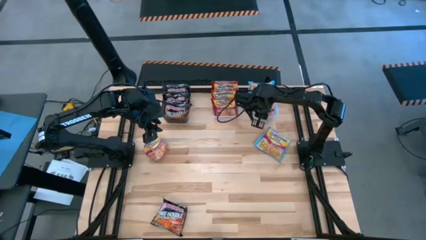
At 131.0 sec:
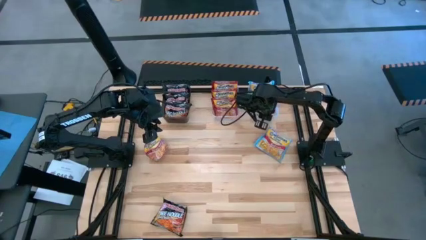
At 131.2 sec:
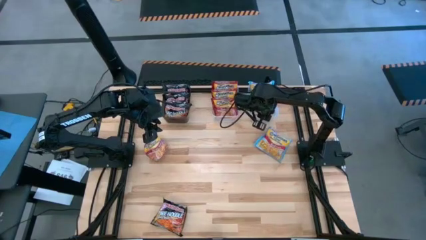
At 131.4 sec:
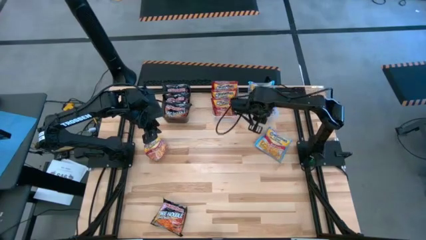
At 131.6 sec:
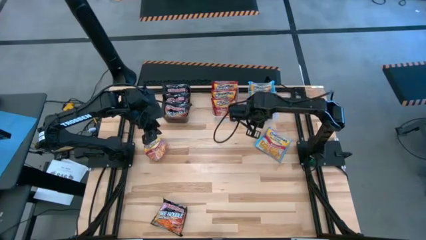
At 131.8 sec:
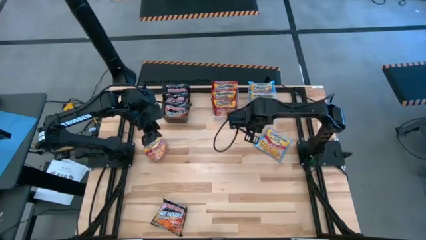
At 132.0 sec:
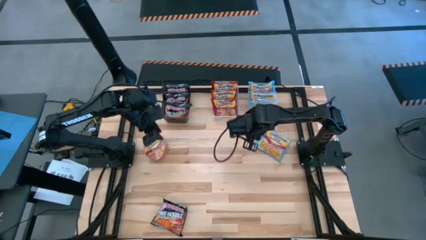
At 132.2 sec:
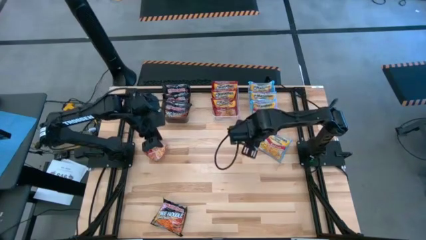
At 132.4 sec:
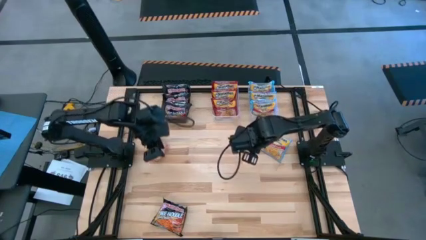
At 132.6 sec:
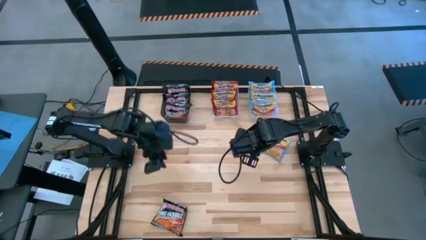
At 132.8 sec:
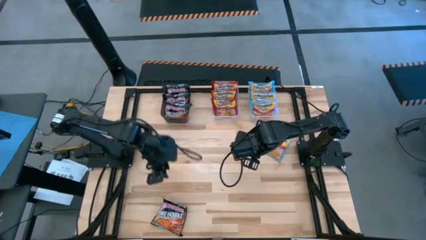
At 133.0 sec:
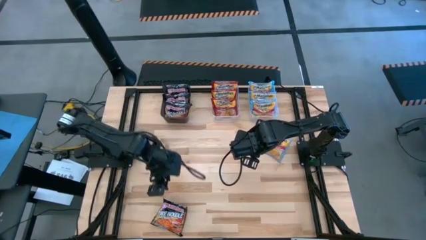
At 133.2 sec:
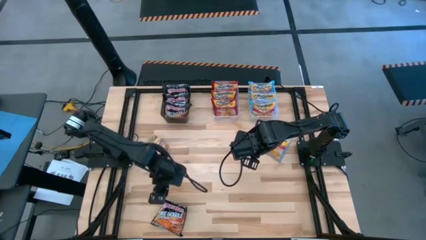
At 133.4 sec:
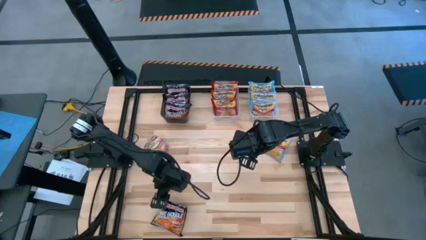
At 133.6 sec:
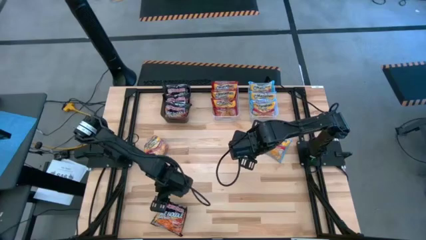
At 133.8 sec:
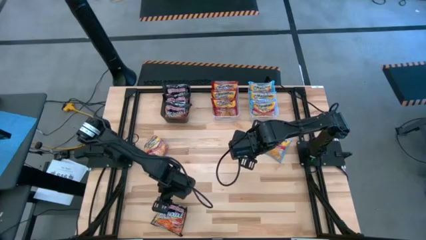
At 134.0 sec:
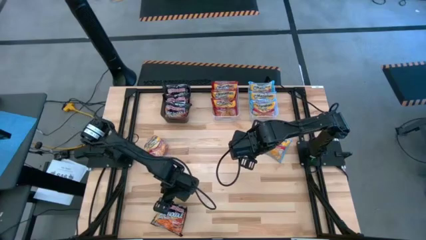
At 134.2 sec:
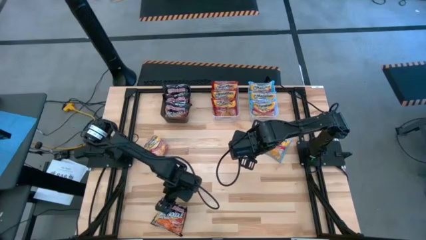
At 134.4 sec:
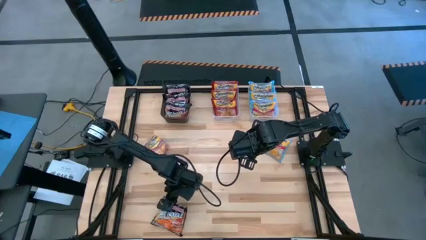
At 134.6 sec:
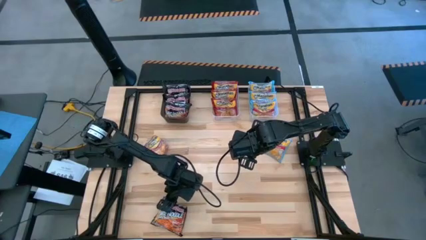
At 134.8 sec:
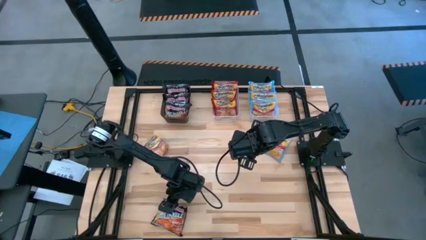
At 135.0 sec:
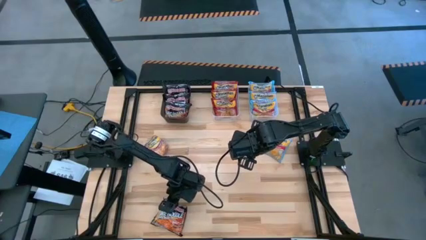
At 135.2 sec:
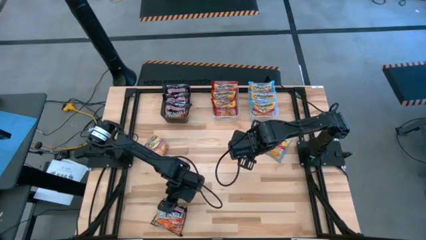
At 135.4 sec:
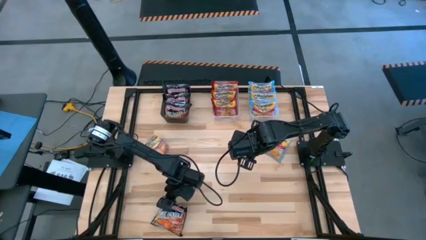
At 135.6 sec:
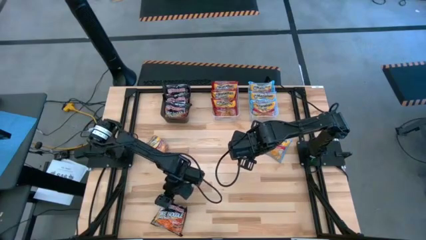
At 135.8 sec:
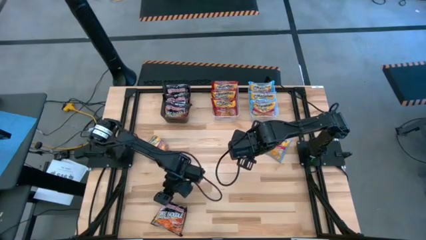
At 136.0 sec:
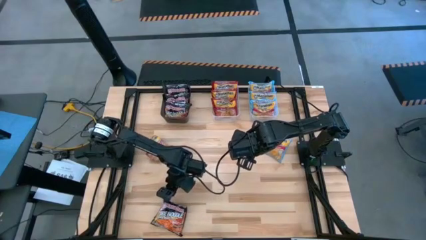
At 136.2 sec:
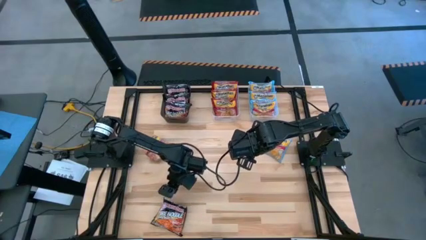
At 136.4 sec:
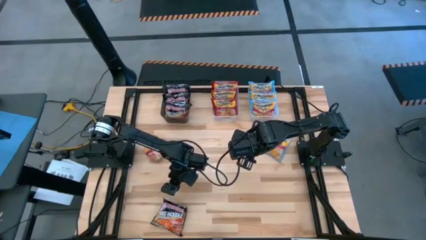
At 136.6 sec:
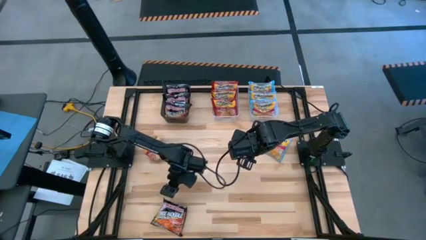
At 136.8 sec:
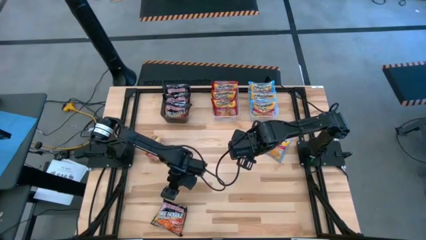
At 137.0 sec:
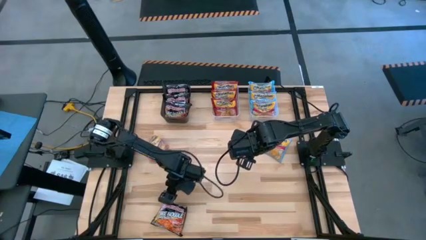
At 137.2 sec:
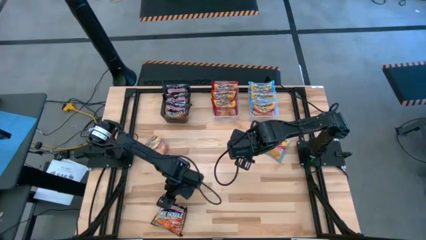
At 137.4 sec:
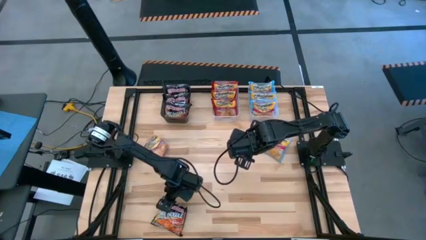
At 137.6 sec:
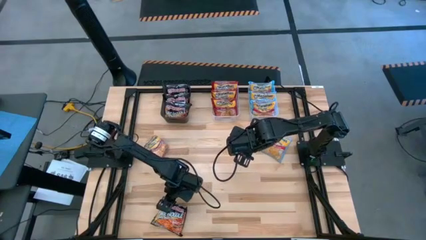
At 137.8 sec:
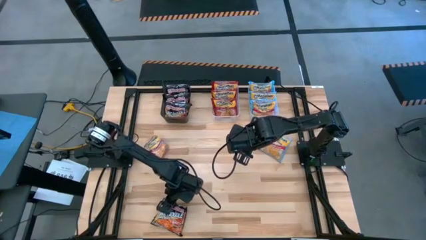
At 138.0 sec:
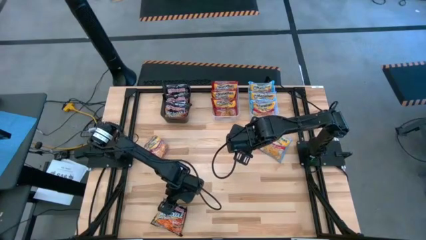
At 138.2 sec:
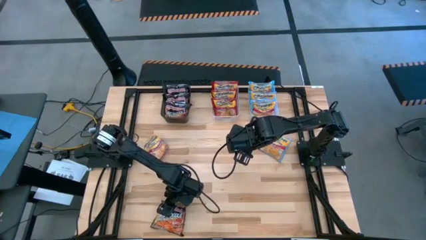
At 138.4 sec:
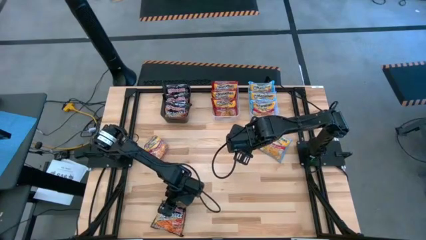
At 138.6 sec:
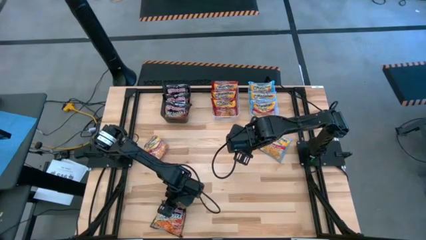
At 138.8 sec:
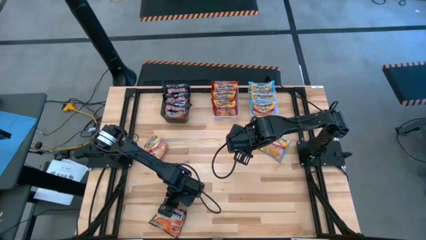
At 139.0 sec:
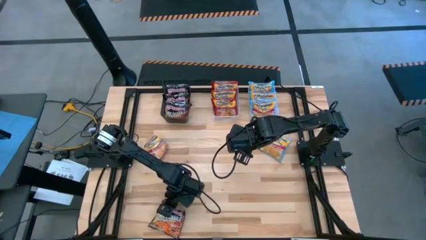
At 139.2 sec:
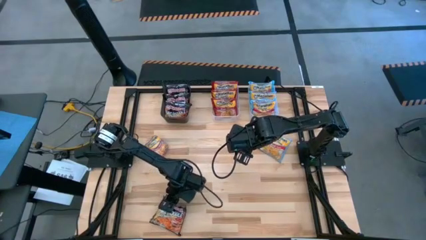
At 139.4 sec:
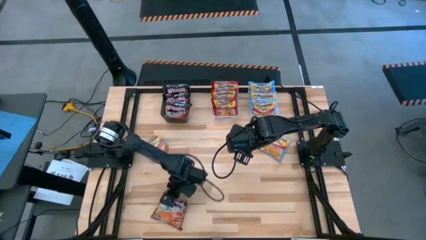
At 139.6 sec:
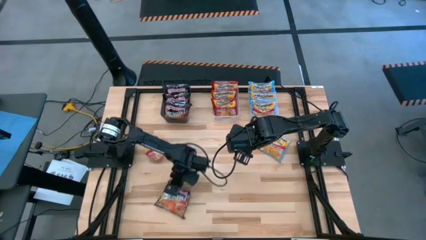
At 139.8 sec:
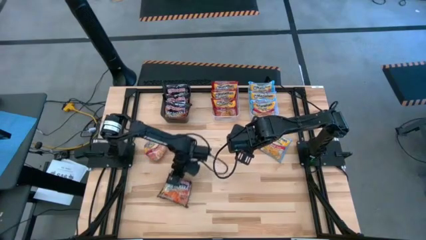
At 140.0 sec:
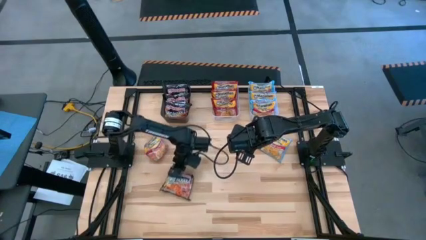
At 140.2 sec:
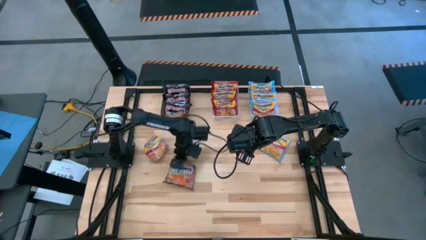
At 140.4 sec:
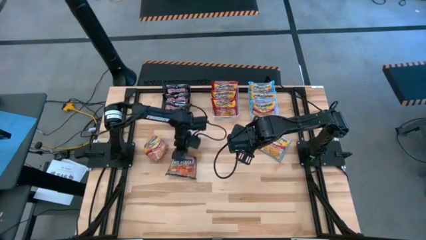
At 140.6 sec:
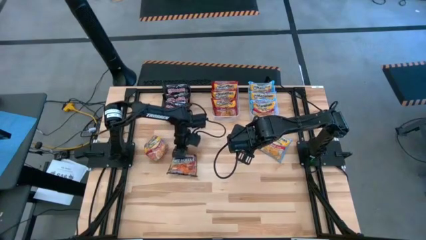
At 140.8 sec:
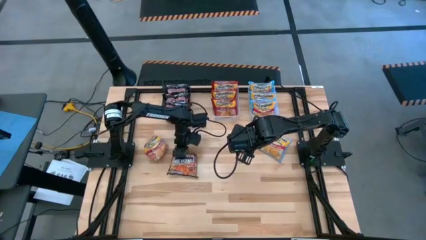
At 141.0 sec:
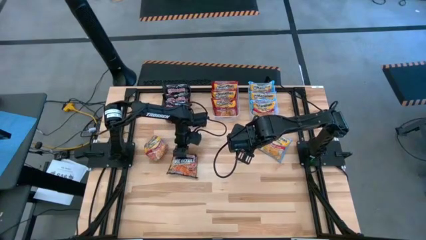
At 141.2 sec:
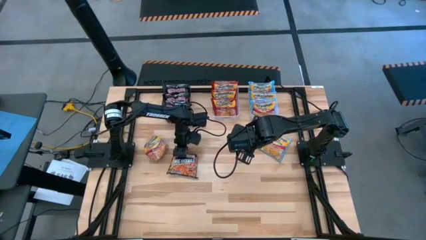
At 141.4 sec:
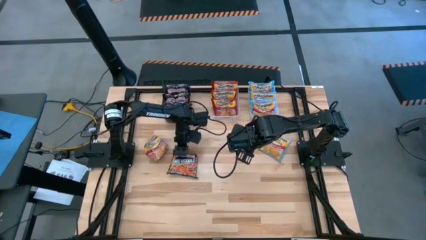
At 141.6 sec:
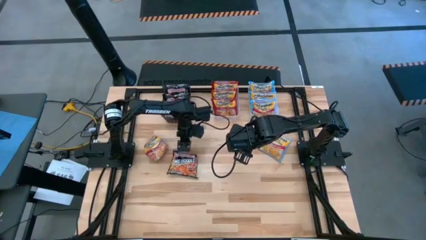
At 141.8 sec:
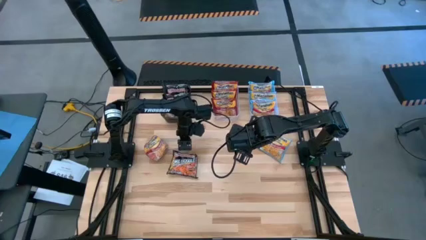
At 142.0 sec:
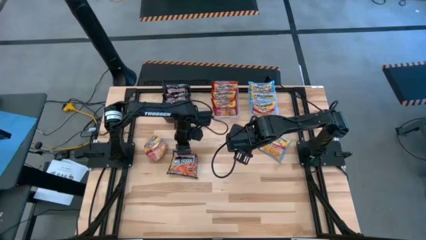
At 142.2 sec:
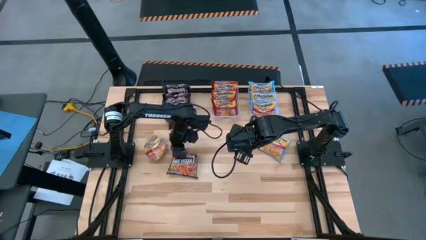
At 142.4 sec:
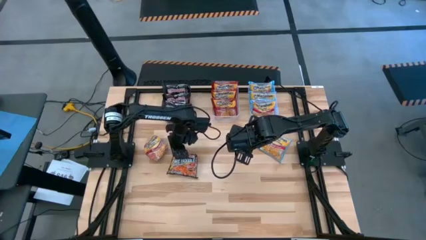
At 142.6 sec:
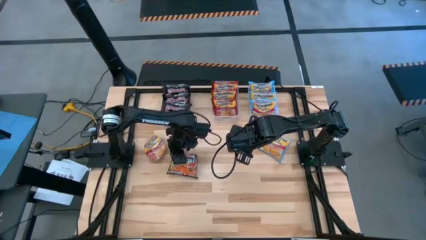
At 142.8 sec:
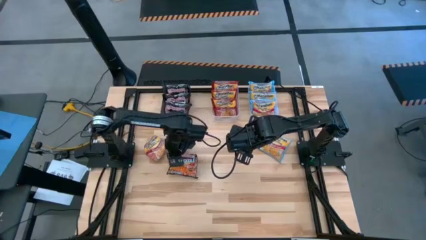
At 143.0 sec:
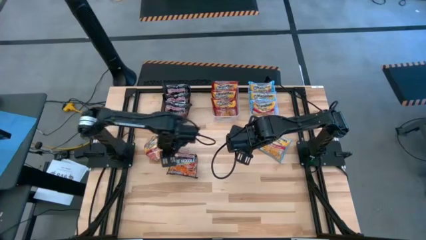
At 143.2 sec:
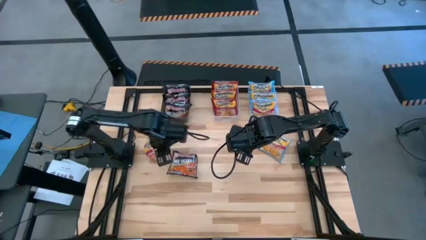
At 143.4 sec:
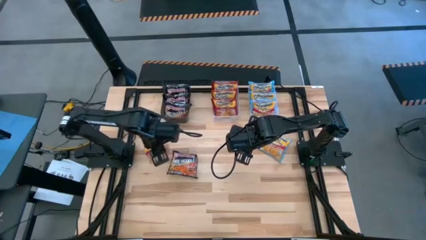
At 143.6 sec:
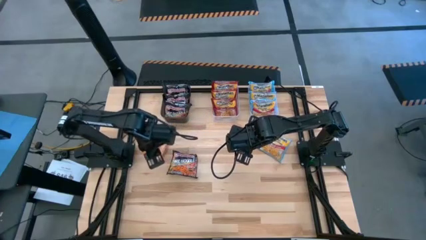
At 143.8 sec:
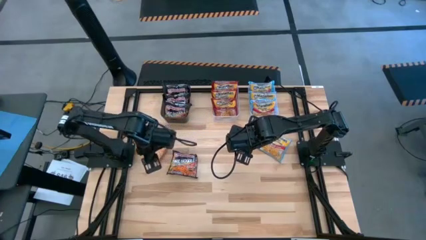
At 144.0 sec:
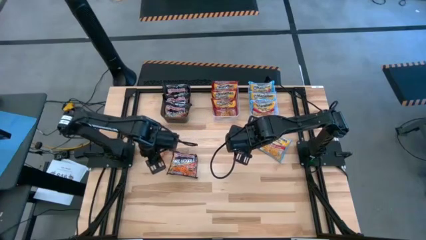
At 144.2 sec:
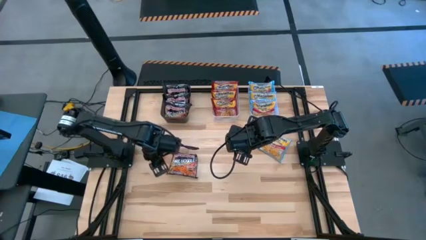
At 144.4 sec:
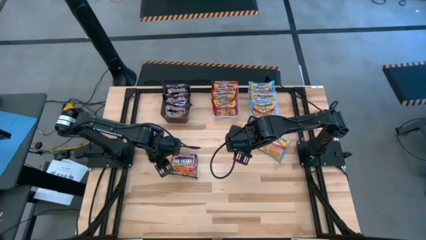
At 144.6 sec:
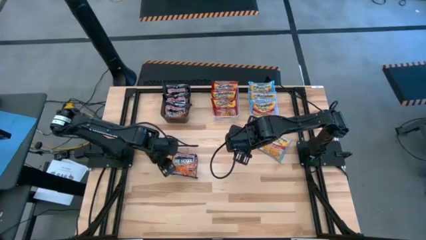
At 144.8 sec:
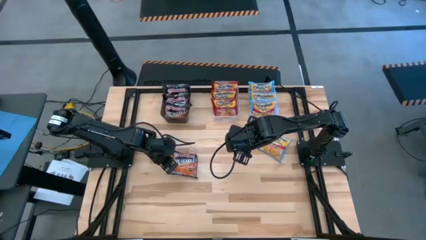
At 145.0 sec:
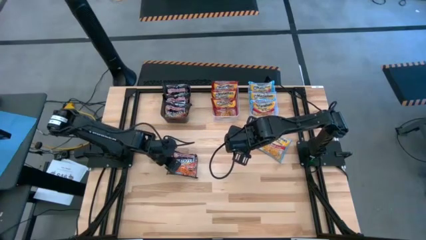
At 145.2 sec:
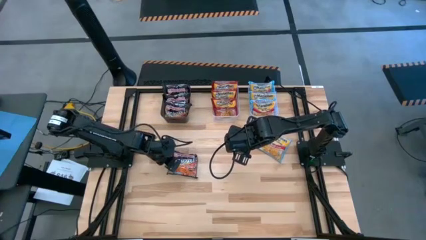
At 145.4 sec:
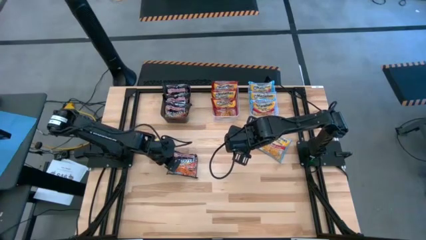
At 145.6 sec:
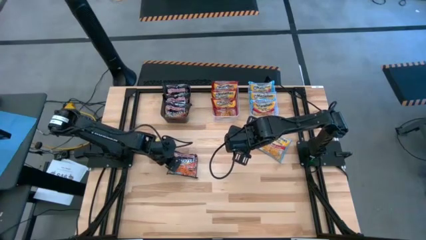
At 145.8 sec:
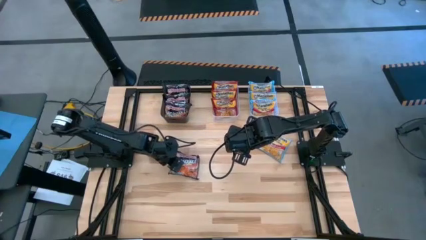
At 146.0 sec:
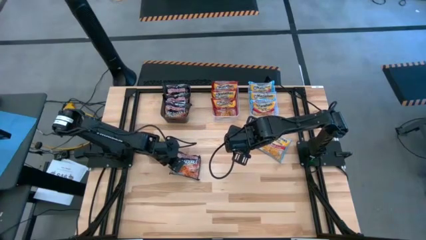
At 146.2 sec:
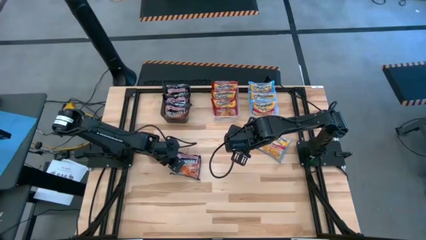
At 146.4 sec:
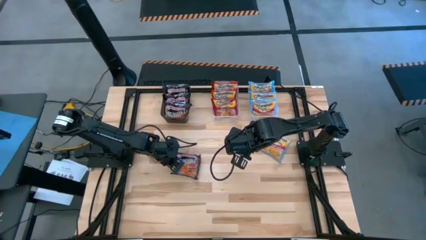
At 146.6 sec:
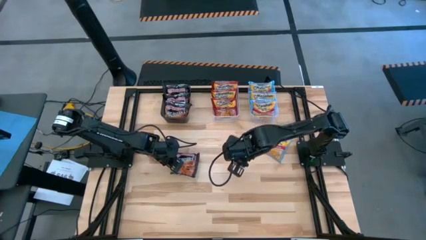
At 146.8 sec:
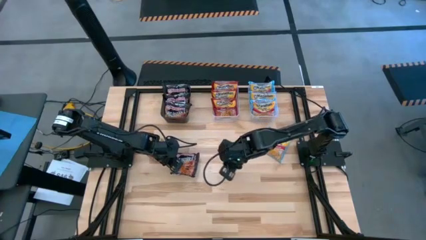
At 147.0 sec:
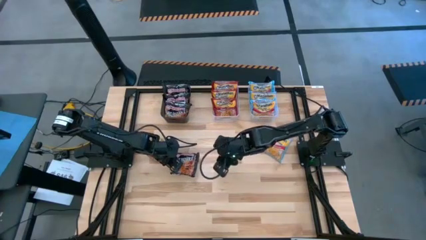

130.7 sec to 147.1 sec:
Task: Sort Maruchan noodles
Put the black noodle pack into the black bin
